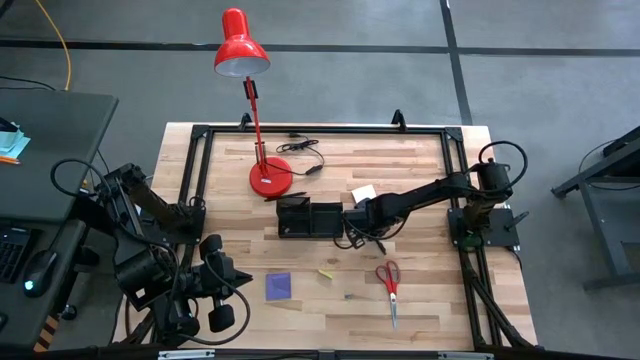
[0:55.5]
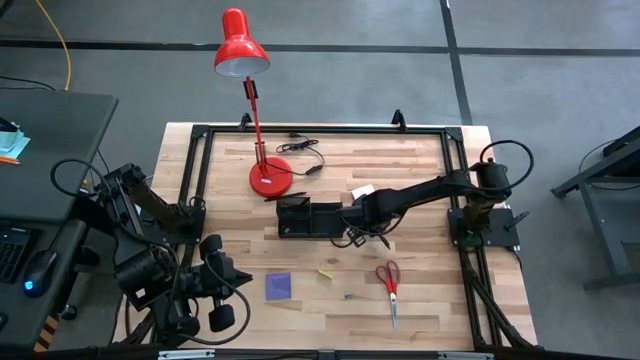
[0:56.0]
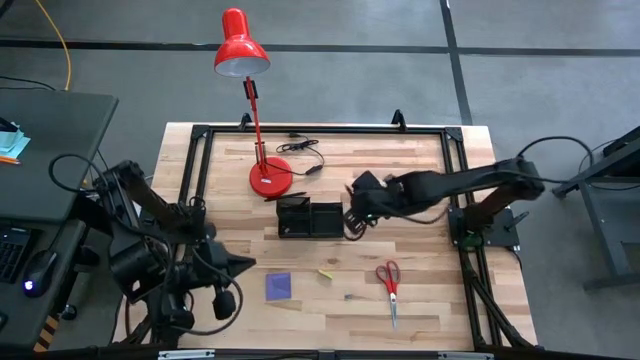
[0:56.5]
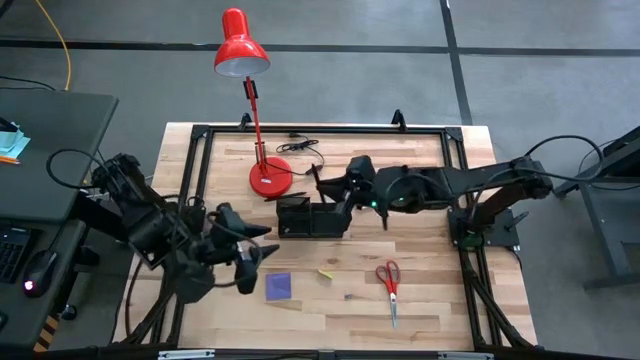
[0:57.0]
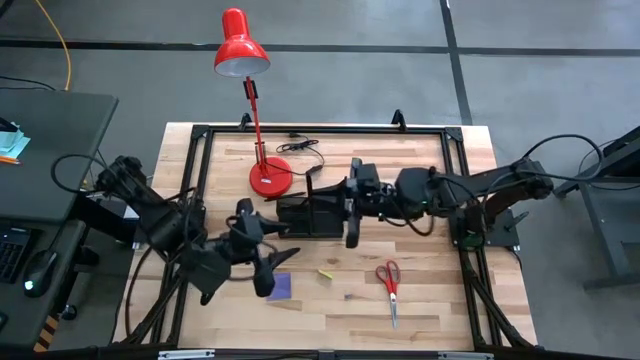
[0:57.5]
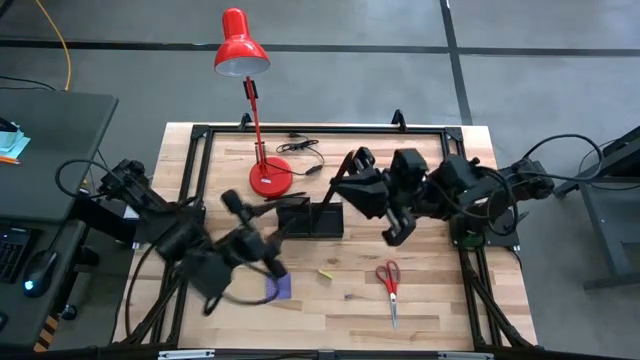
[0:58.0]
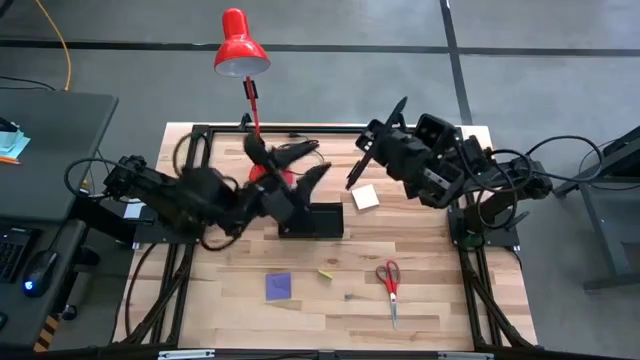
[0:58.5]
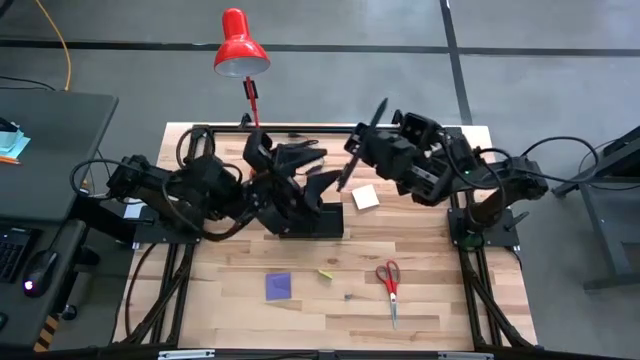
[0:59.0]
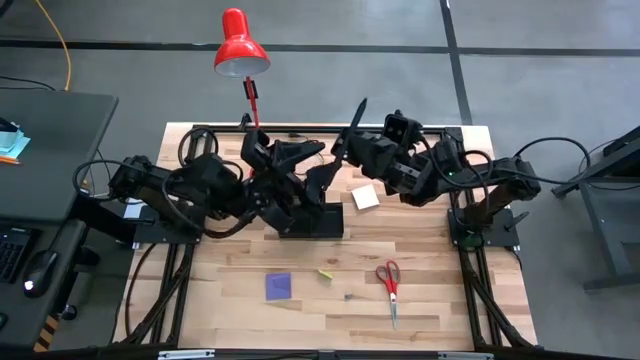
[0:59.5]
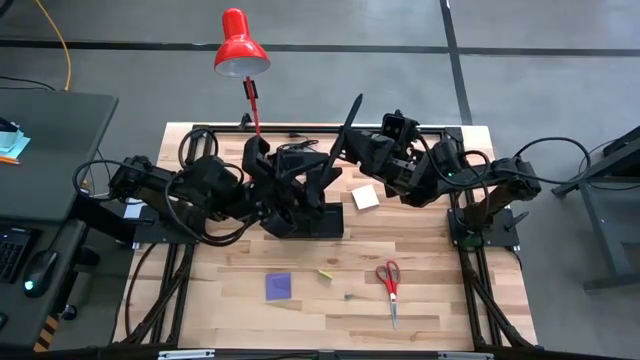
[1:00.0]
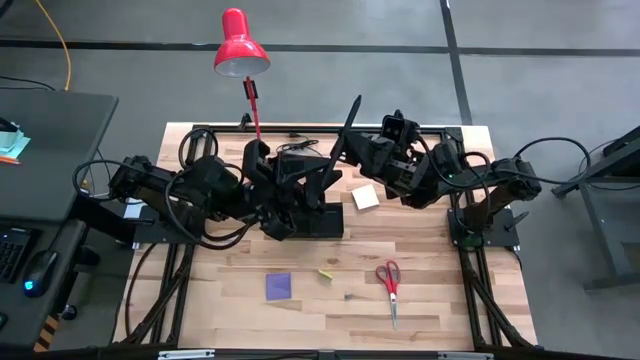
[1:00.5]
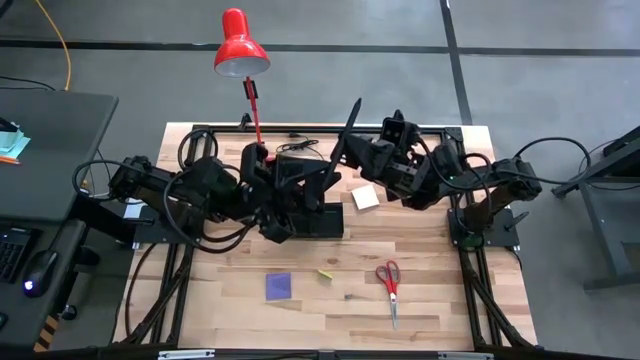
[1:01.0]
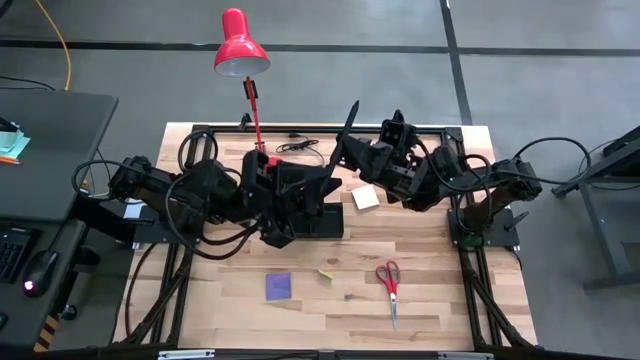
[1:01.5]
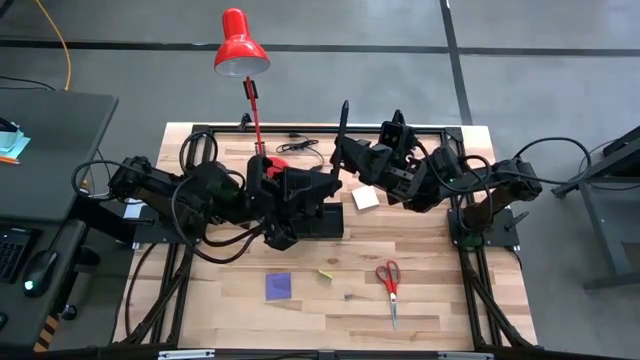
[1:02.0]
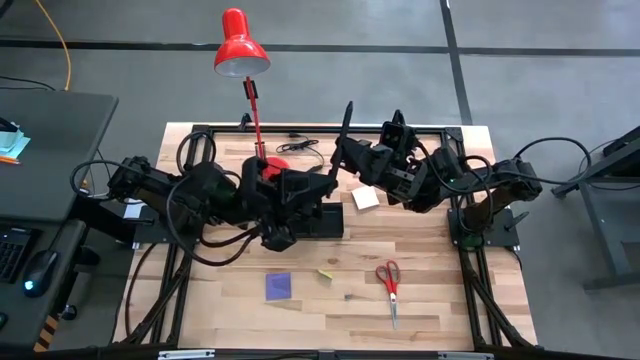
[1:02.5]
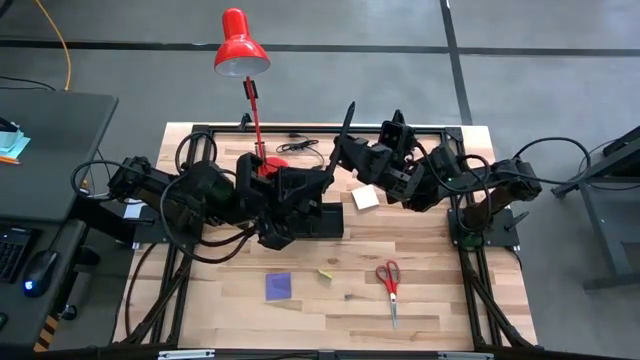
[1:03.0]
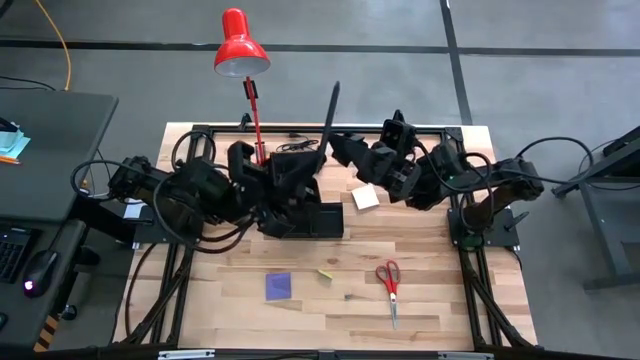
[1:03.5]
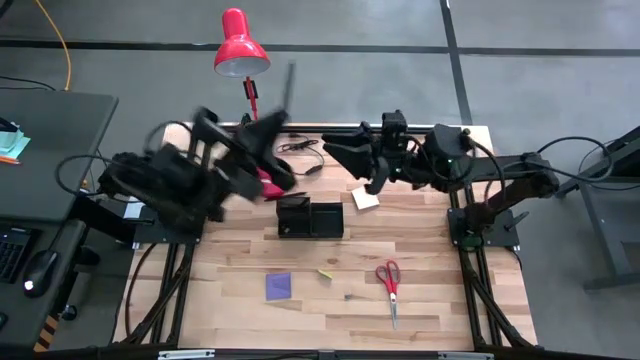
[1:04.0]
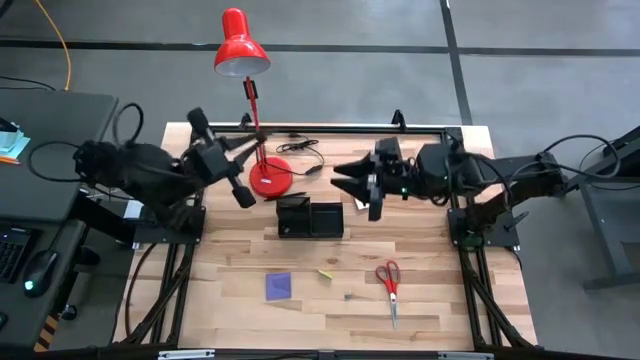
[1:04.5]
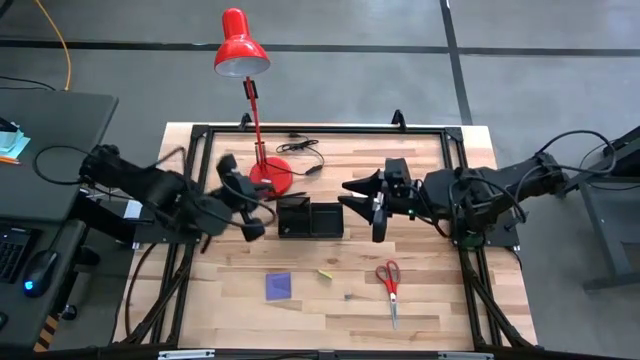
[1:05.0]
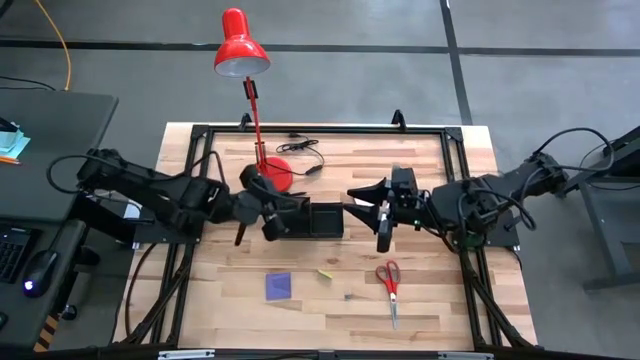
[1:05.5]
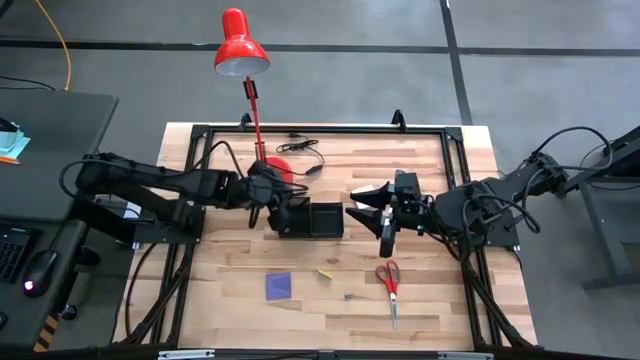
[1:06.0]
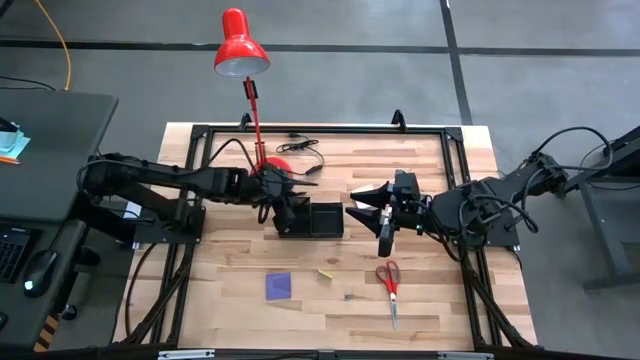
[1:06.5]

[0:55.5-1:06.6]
Task: Pick and place office supplies into organizer
Put the right pen into the desk organizer
